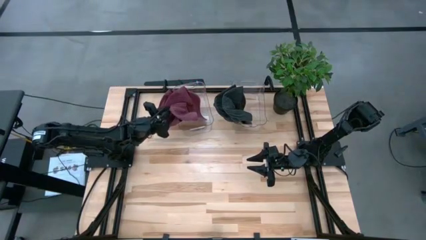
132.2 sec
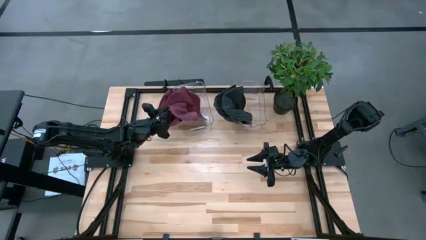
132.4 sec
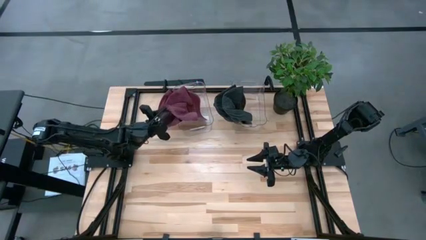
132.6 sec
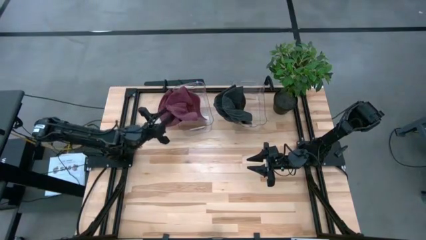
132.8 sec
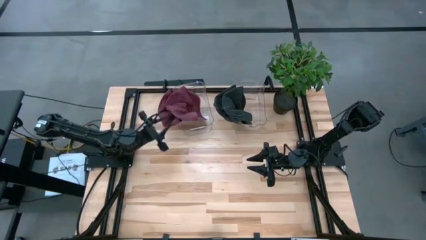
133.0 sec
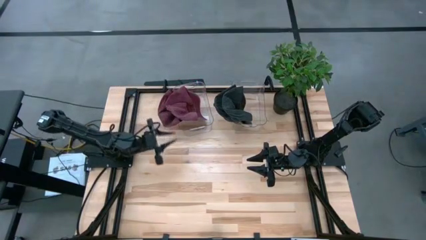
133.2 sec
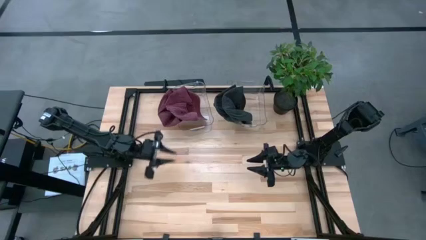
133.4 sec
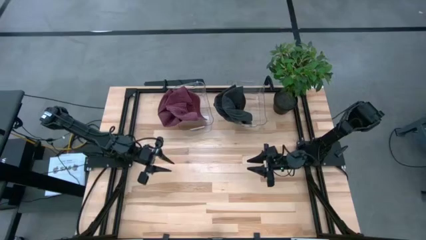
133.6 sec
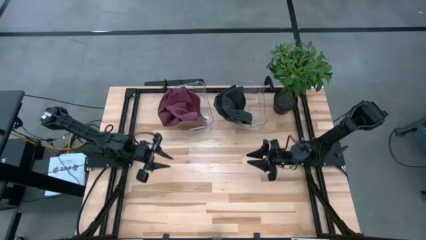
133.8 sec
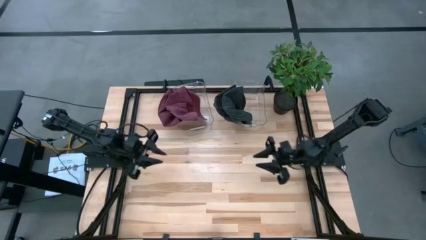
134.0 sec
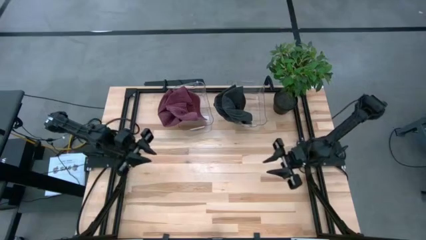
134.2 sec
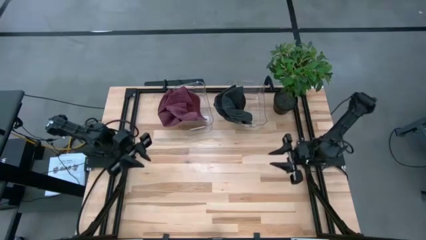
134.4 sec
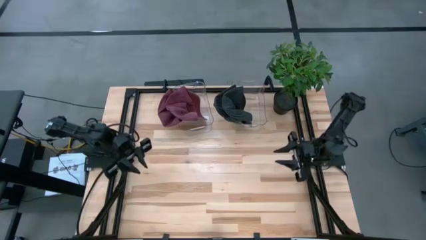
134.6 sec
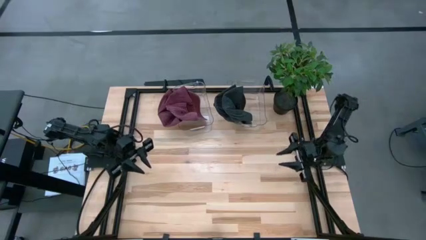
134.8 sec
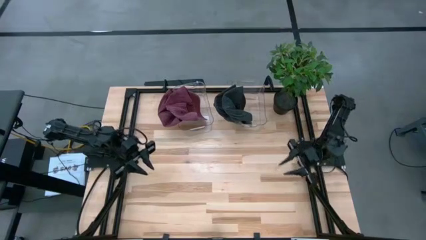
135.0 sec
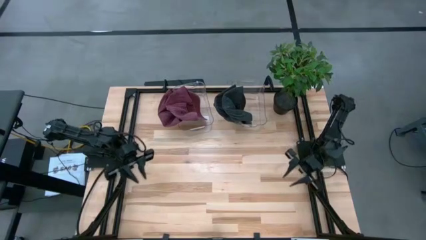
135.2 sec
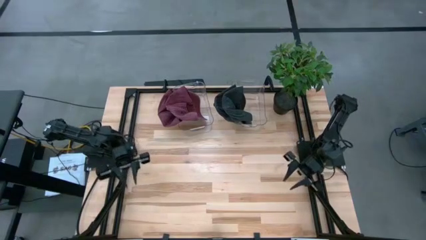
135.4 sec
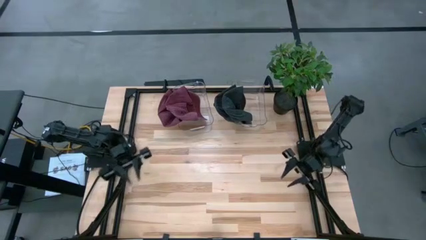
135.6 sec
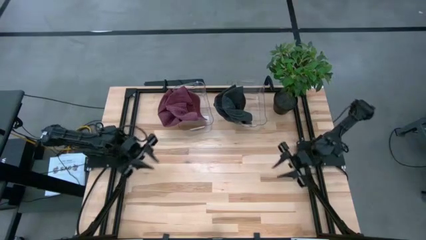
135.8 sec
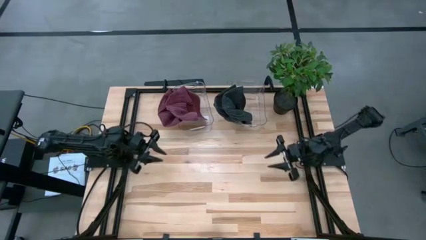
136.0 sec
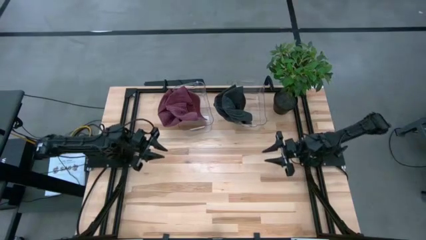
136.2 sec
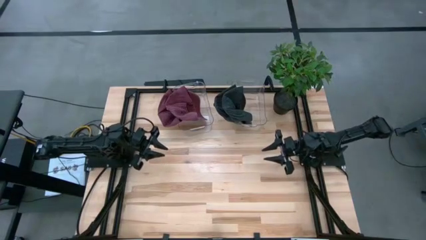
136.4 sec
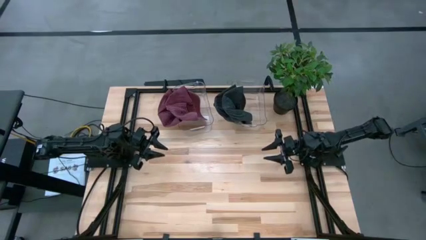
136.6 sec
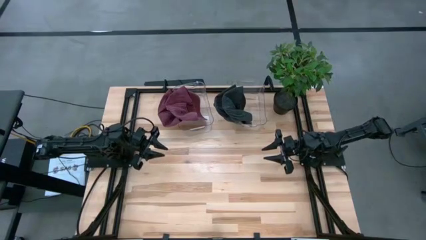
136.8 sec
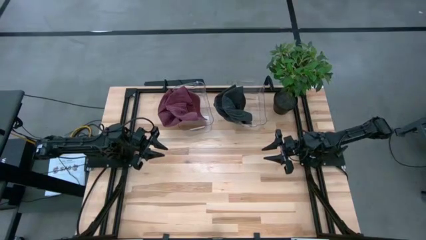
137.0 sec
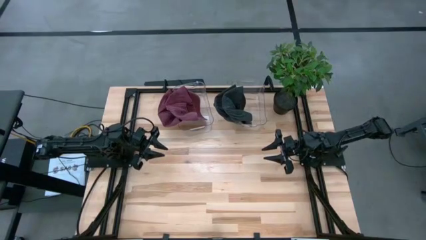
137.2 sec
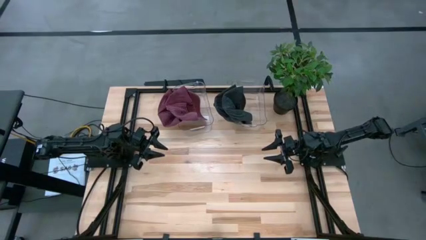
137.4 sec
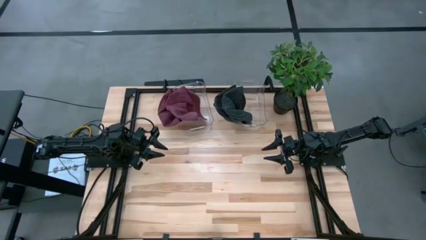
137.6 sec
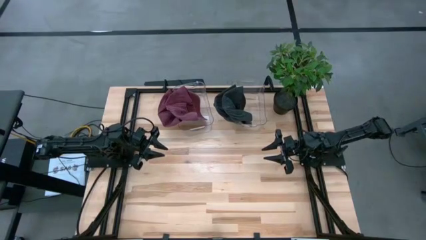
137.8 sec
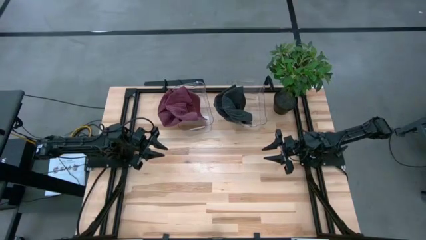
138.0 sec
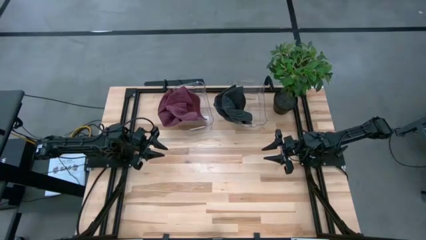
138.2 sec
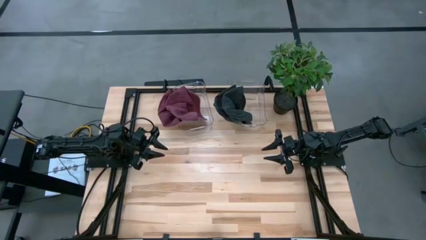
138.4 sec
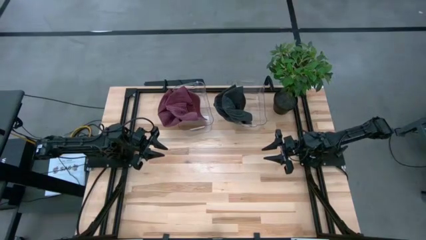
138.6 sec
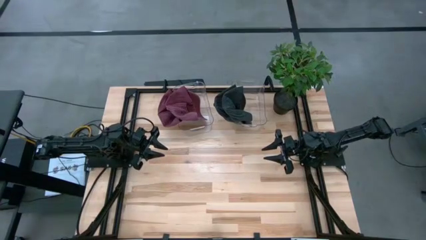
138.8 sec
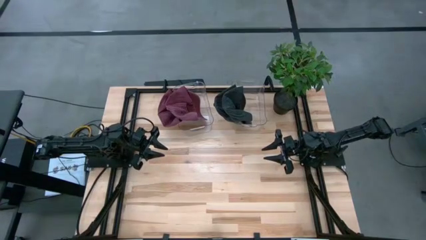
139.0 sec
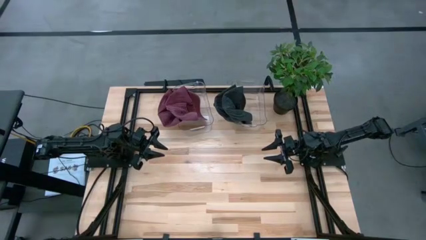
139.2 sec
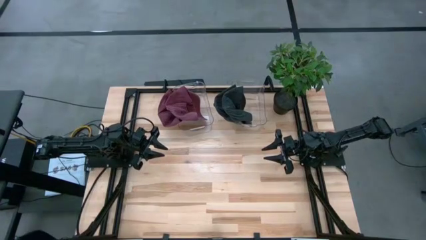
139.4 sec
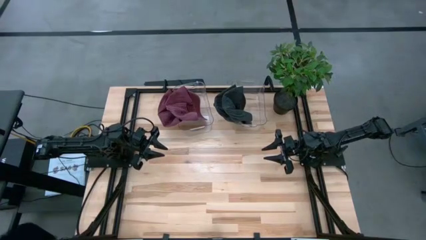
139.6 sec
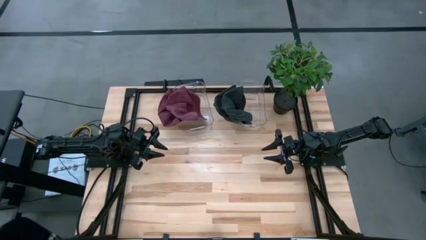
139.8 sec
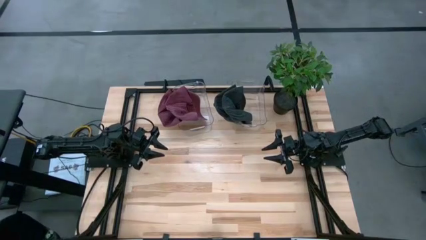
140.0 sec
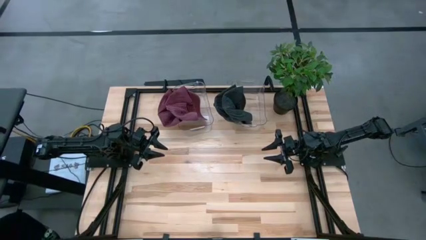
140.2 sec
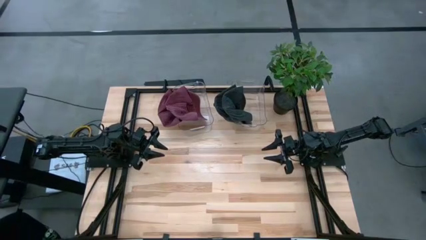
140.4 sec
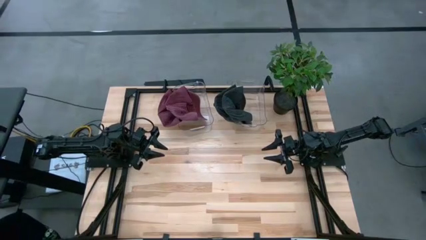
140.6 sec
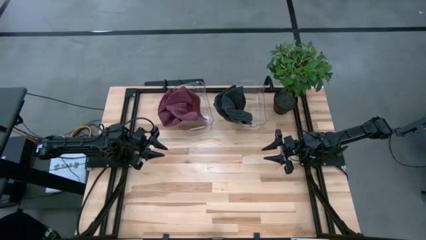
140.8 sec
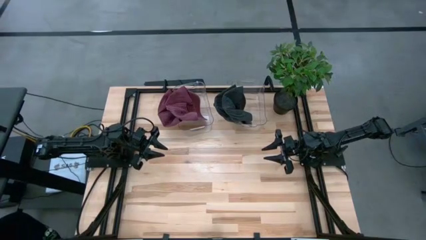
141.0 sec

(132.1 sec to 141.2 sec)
Task: Pick & Place hat
Return to Home Position

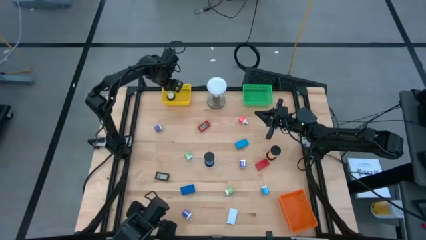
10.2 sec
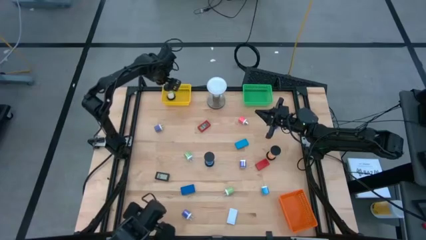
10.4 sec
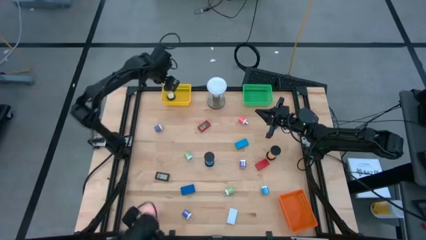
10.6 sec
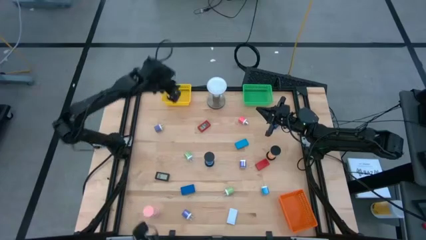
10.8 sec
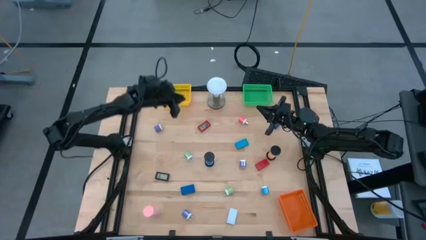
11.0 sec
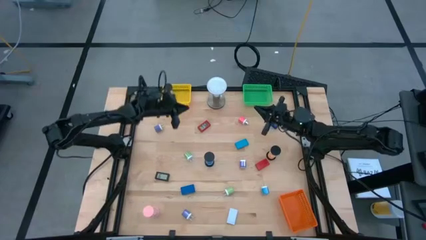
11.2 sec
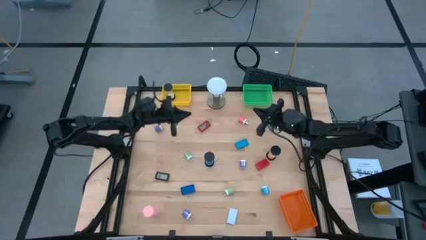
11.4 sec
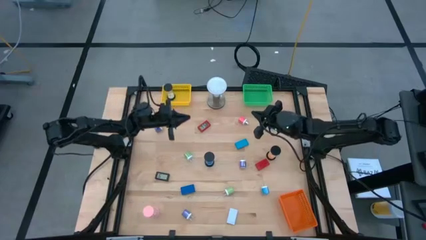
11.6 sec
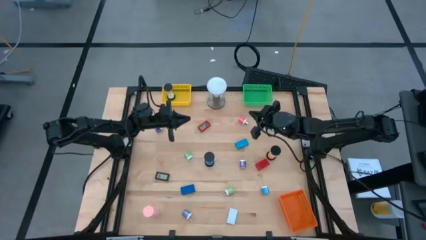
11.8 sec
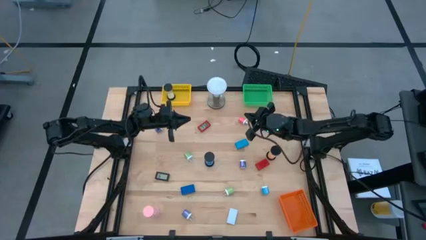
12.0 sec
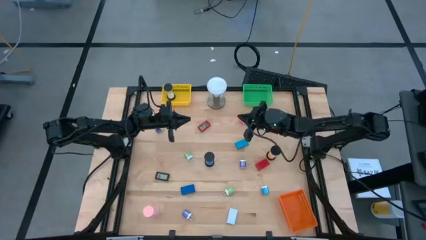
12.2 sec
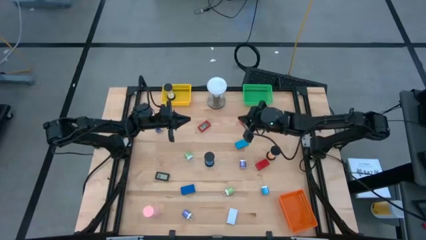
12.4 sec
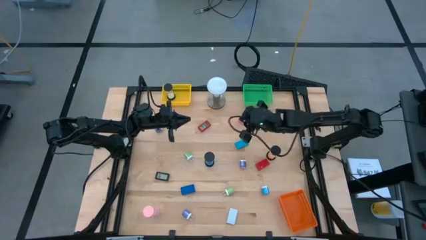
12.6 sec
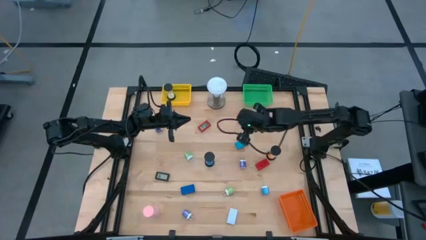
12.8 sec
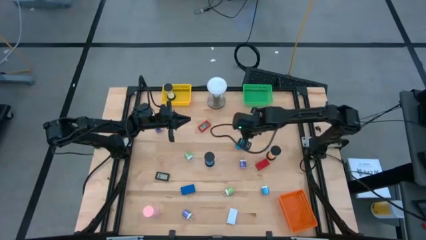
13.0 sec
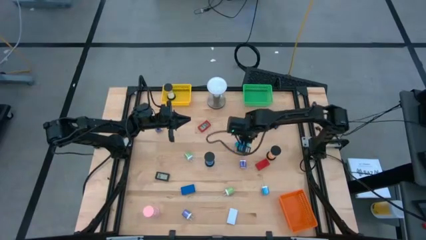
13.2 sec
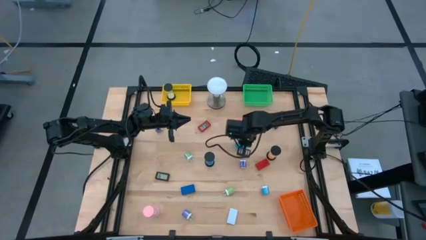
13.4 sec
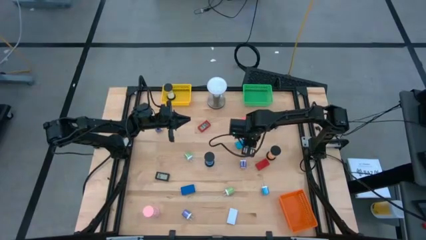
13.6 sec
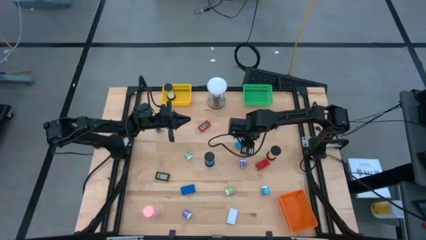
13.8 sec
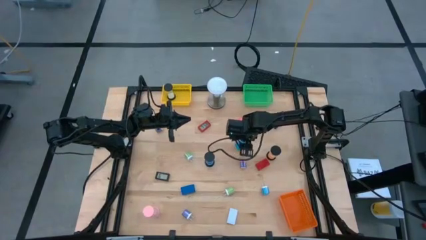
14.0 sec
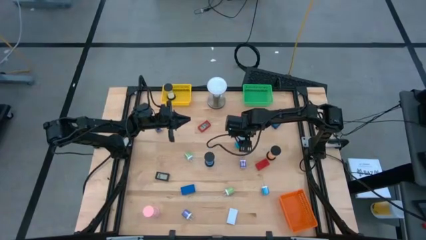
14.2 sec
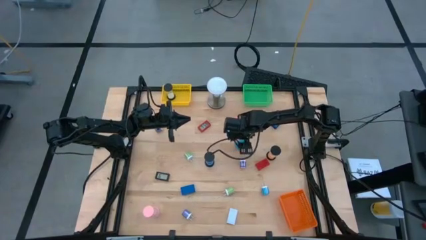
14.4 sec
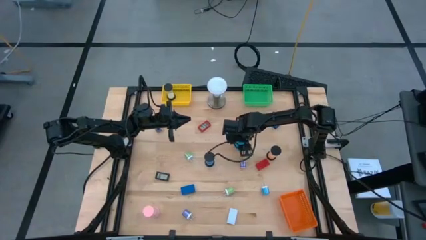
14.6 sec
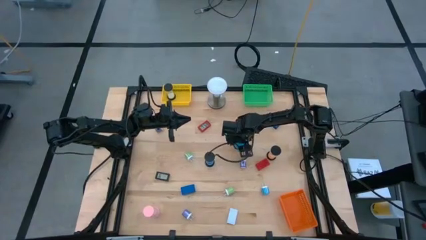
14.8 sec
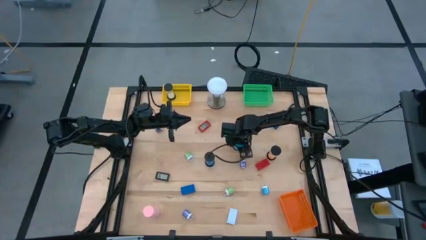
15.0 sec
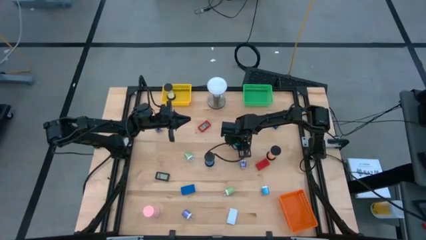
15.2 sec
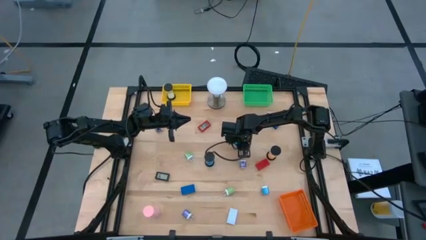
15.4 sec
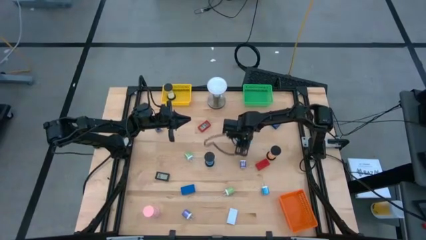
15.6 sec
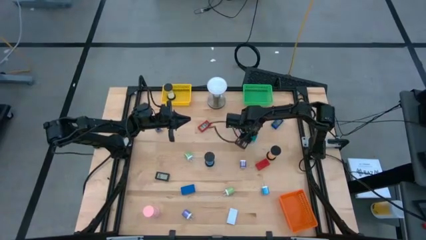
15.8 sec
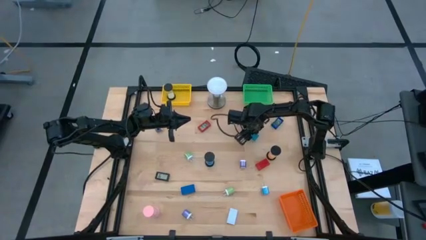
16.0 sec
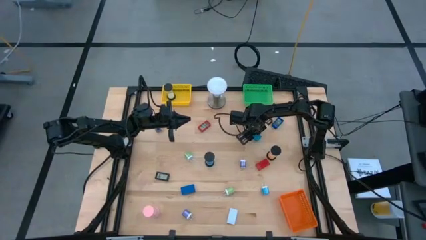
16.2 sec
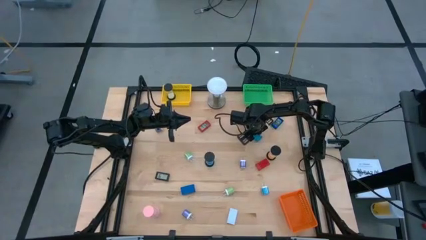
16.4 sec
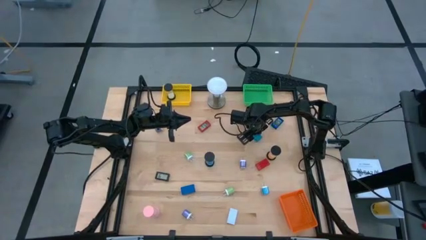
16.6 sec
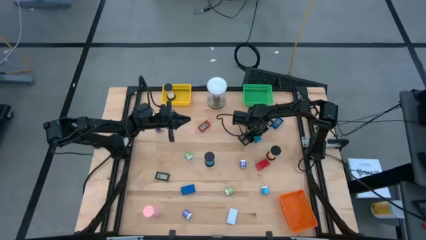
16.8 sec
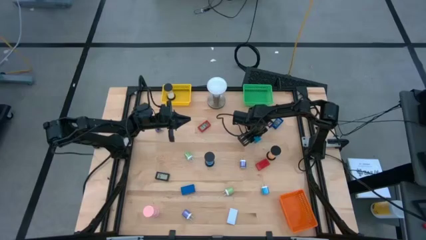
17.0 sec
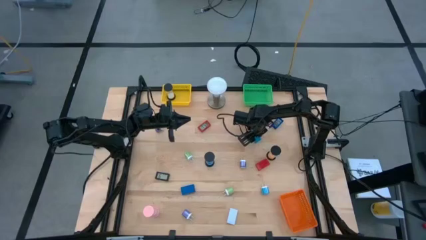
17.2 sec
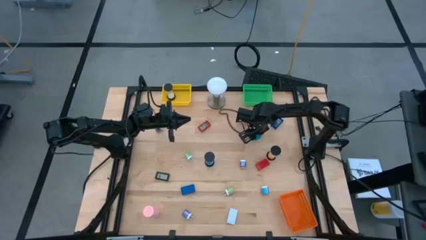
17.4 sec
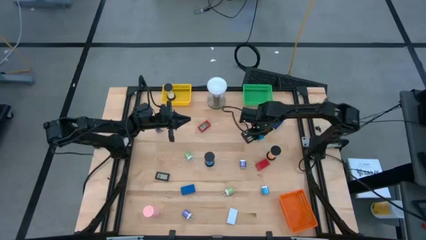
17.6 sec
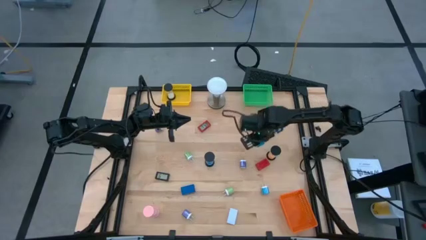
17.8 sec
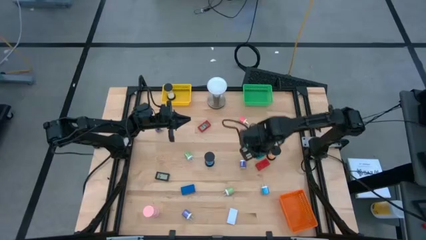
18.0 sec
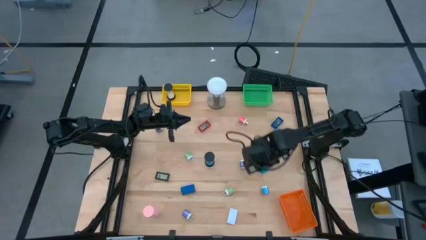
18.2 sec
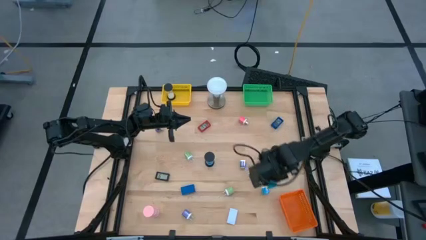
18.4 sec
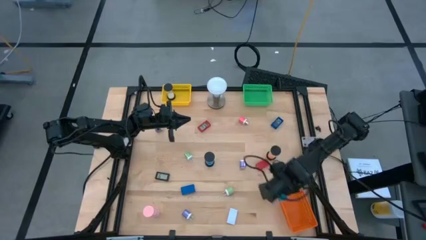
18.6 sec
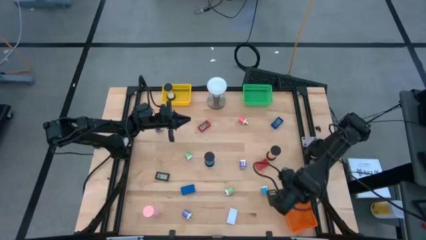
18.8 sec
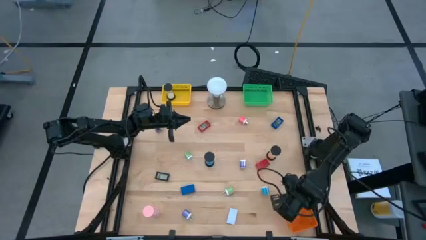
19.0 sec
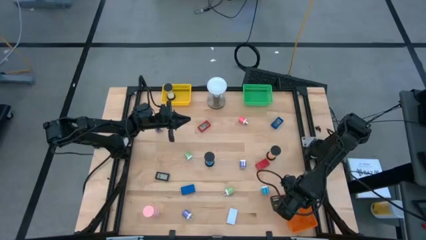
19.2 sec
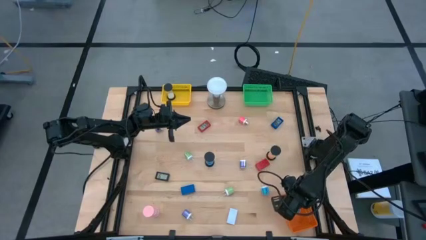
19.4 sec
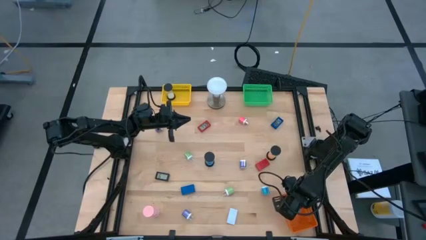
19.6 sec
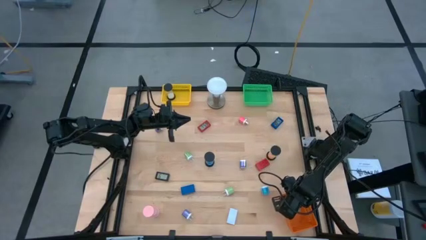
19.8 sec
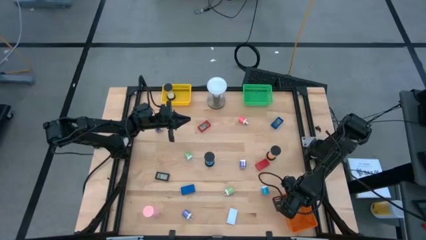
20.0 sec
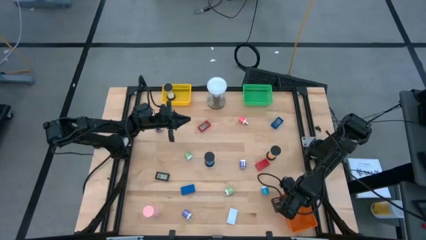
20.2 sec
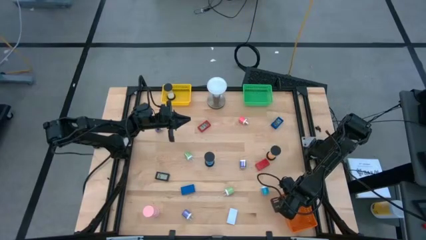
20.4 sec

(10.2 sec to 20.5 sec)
Task: Pick & Place Office items
Put the light blue digital timer into the orange bin
